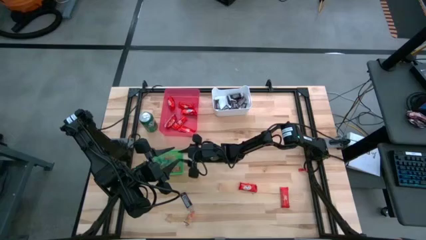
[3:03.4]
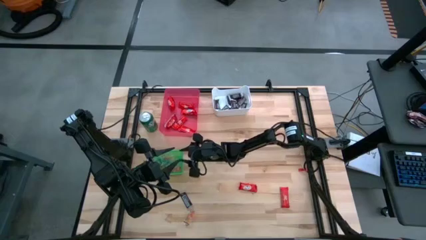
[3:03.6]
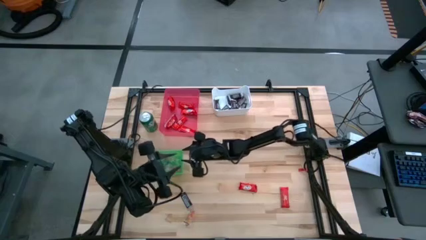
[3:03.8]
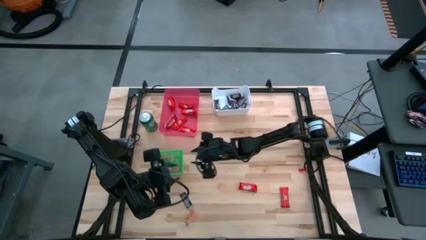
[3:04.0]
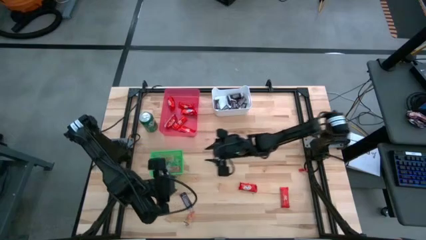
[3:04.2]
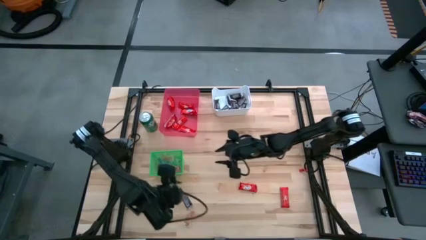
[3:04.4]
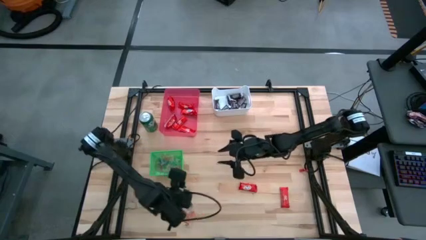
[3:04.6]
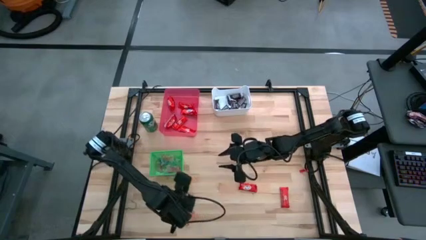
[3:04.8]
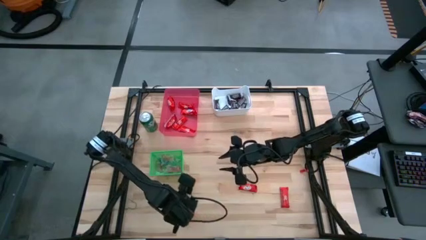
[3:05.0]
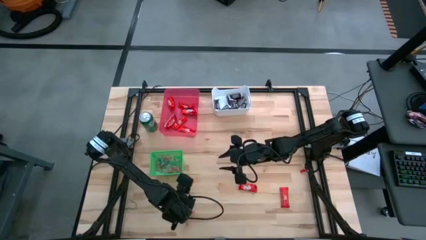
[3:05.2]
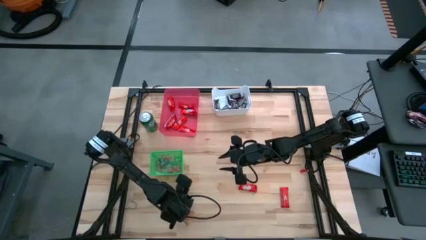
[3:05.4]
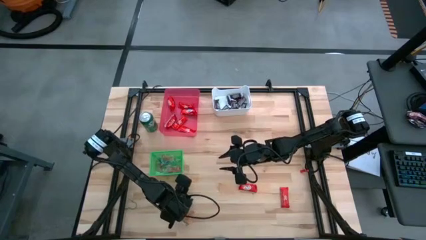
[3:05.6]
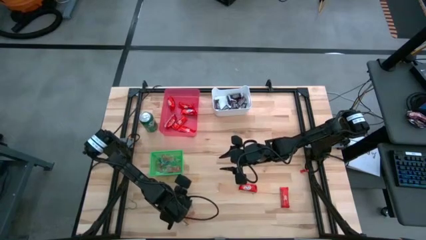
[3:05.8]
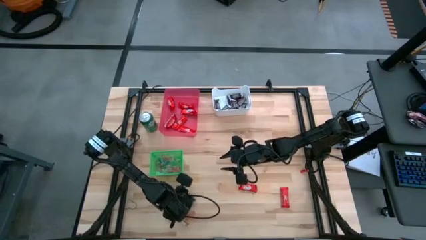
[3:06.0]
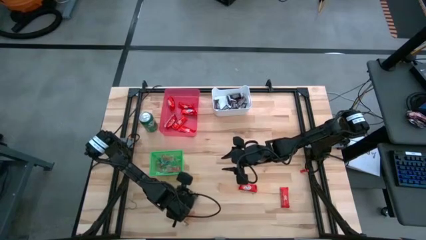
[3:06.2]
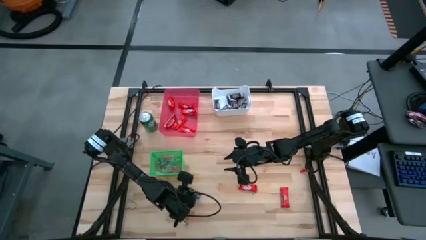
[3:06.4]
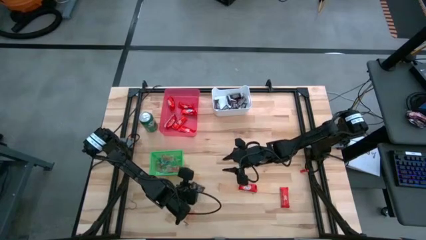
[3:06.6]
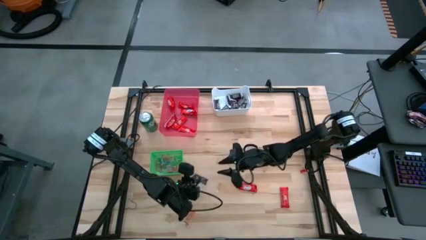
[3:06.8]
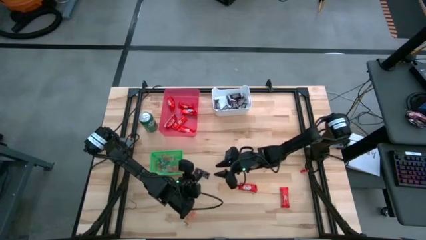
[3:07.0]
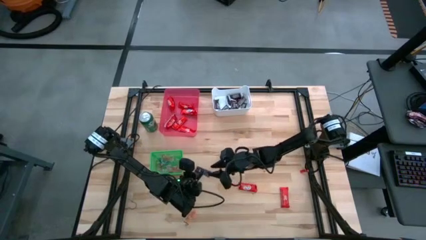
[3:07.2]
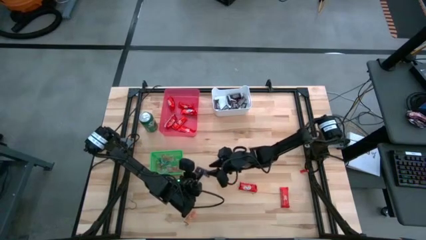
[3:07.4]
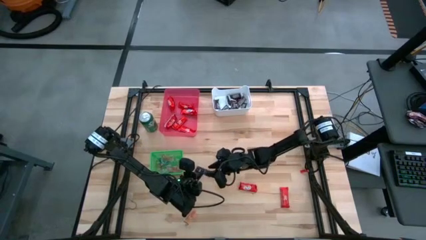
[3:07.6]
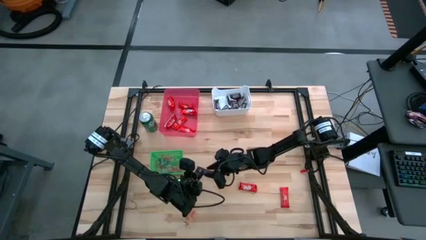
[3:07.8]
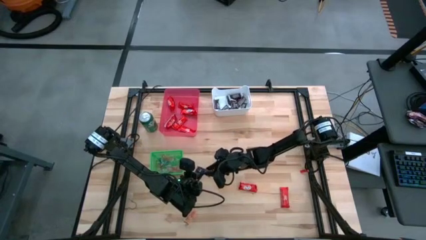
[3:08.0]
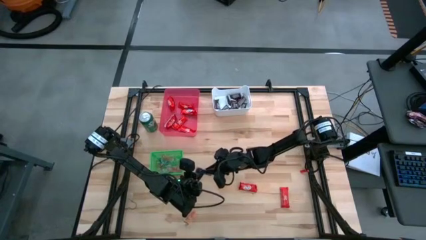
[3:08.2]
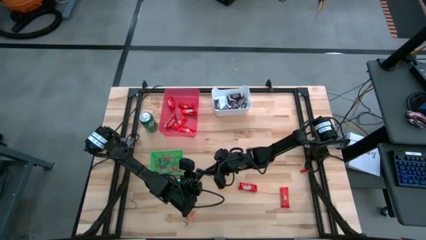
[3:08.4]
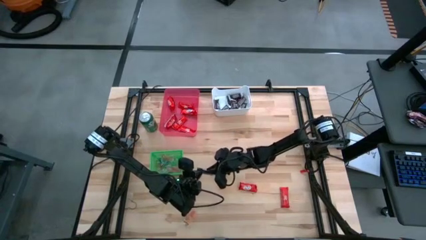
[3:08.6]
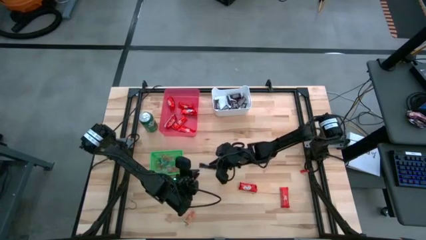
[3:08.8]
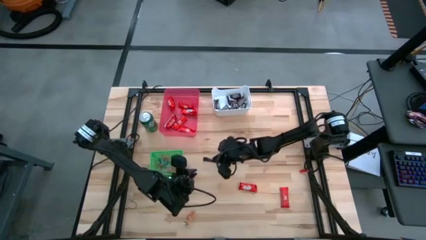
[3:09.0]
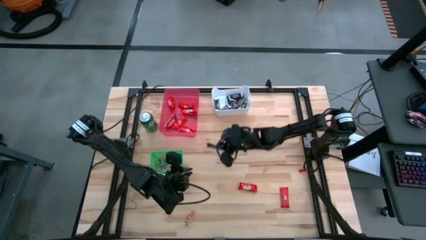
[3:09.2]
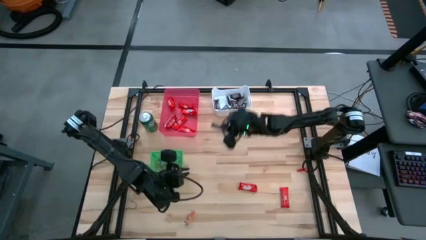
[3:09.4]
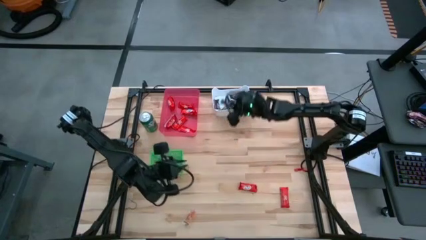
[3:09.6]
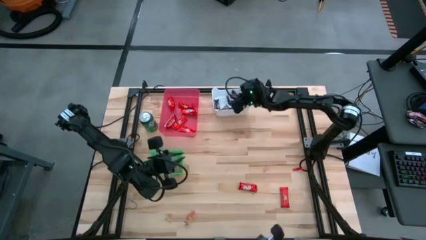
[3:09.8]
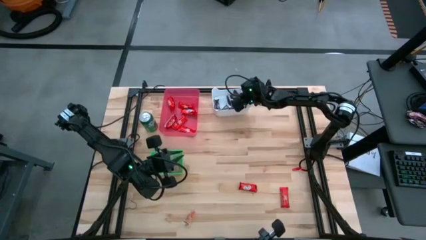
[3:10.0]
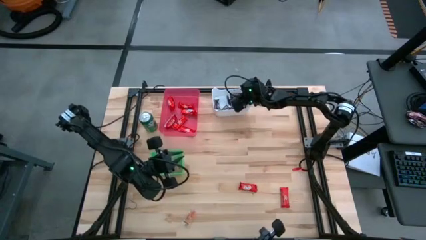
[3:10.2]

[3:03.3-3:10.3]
Task: Organize candy in baskets
Put the brown chocolate into the white bin

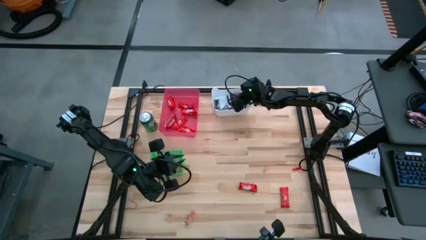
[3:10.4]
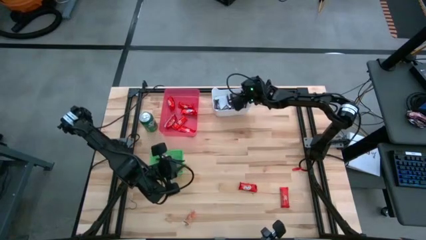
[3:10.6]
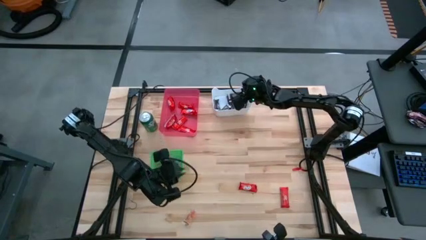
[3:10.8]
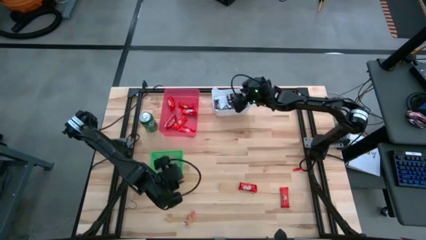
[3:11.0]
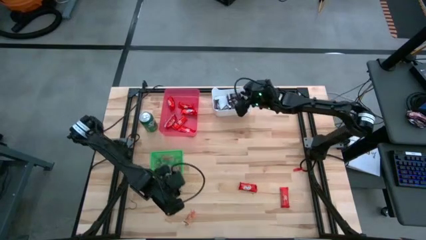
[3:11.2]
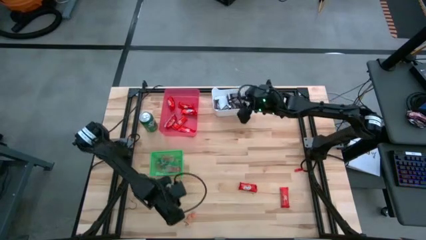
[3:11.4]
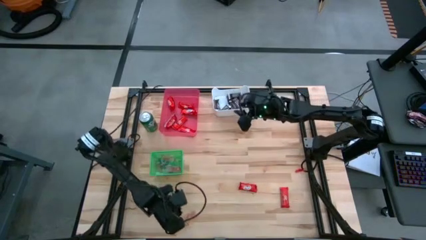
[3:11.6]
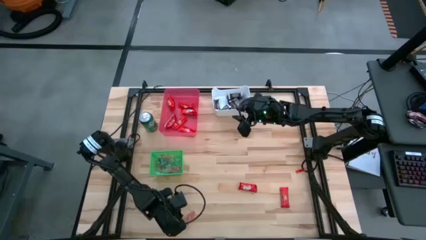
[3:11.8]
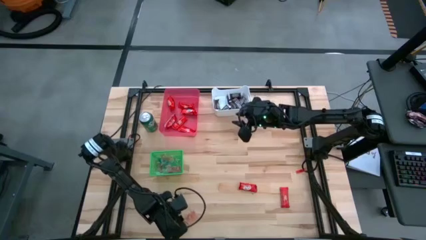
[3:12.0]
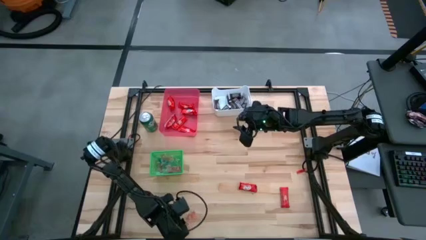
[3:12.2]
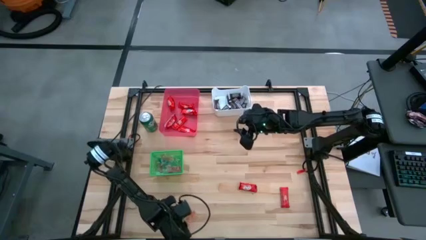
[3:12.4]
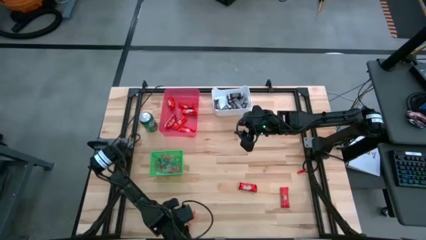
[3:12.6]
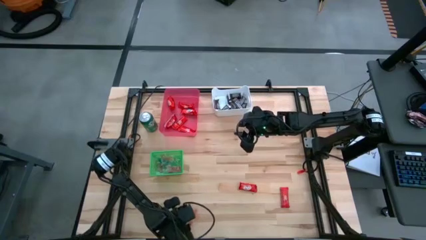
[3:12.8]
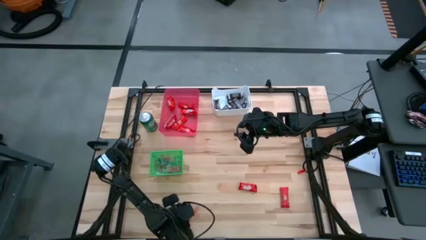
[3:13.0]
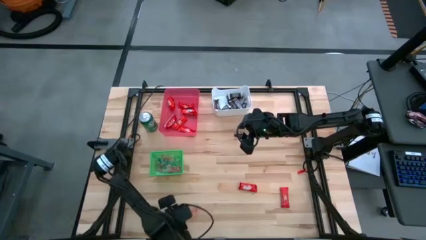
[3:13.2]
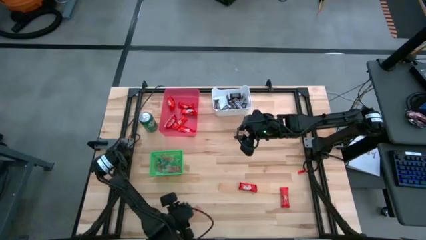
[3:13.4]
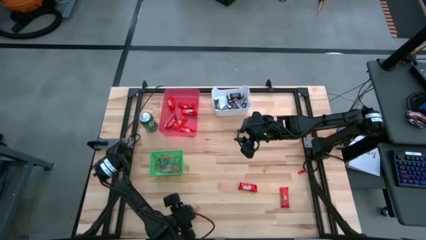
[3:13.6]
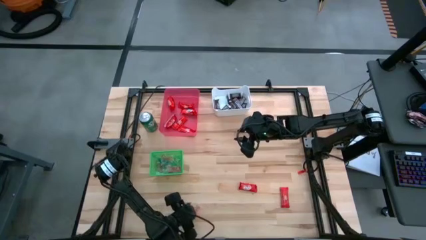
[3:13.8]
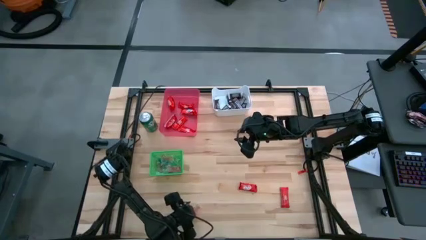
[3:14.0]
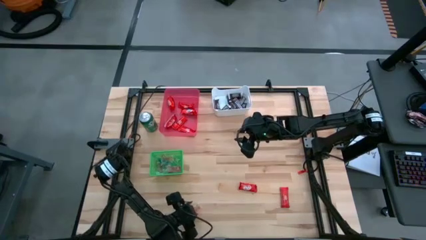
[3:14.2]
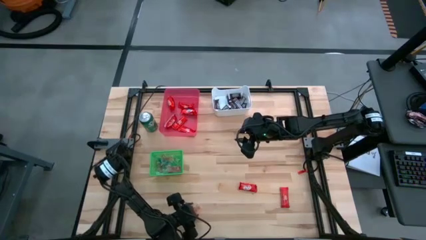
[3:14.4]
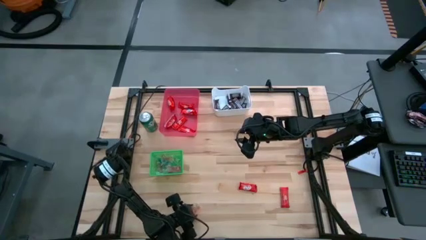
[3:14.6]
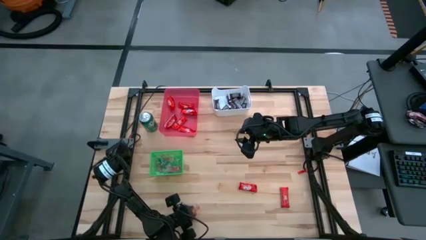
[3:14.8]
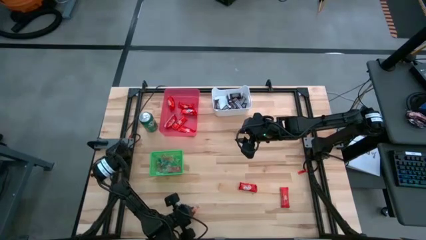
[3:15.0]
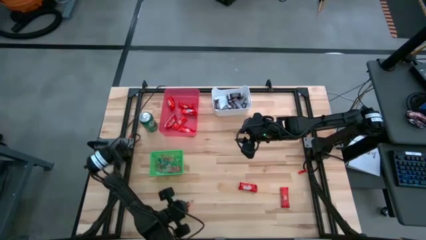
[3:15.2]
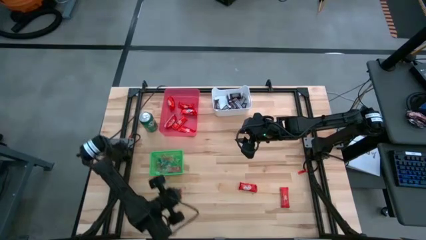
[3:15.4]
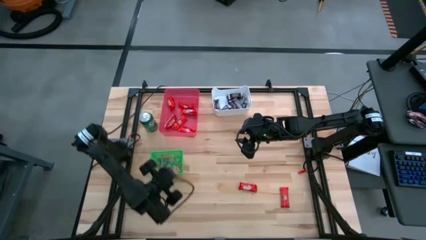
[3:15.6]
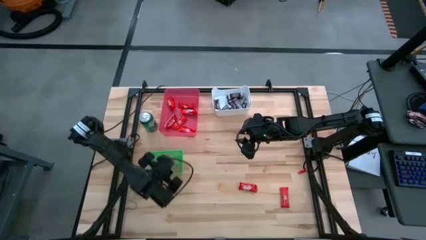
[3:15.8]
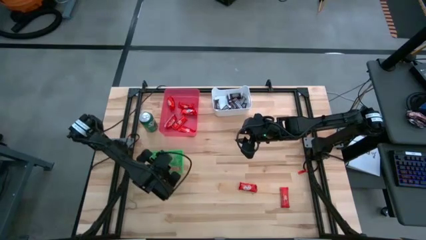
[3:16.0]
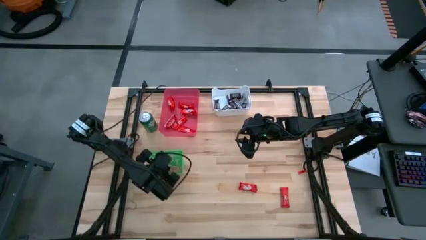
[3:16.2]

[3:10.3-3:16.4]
Put the orange gummy into the green bin

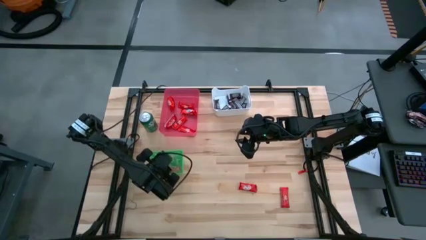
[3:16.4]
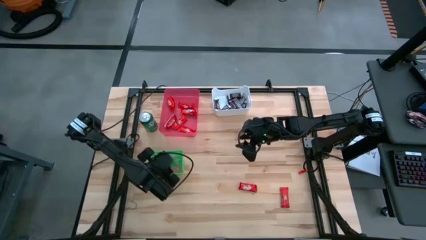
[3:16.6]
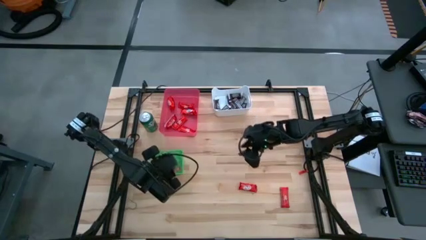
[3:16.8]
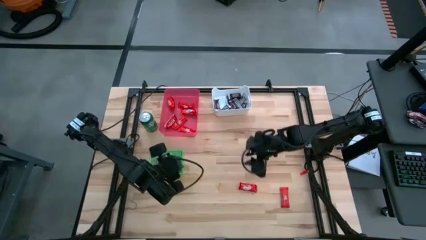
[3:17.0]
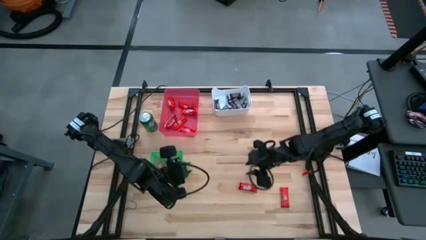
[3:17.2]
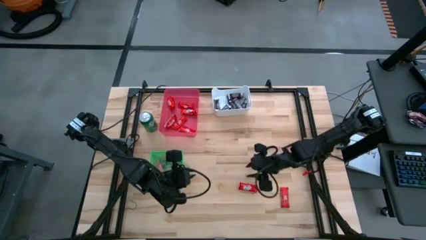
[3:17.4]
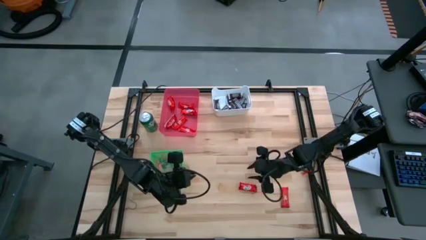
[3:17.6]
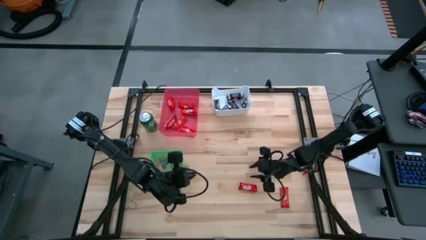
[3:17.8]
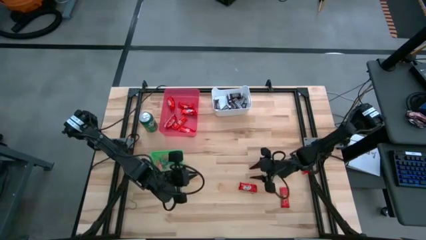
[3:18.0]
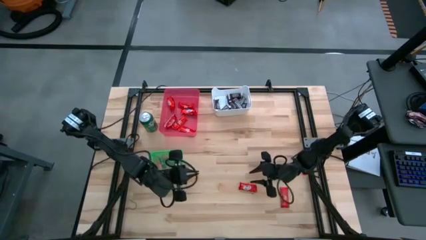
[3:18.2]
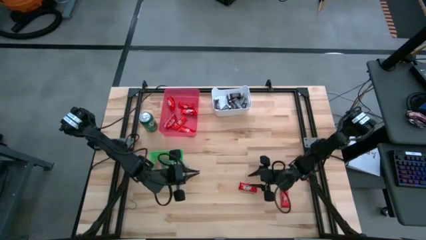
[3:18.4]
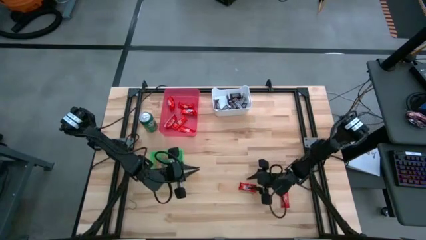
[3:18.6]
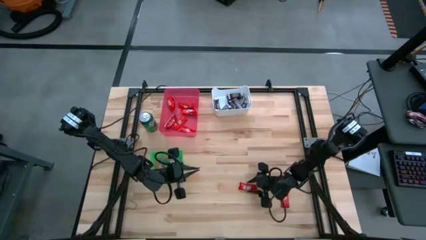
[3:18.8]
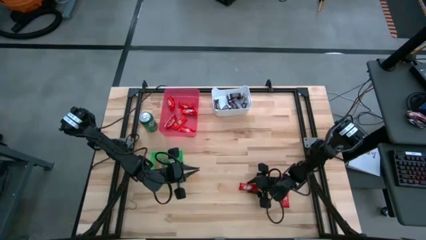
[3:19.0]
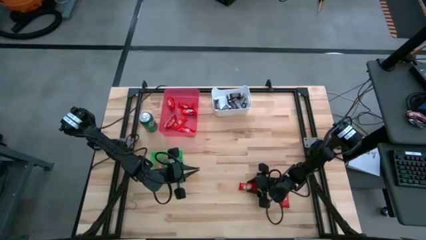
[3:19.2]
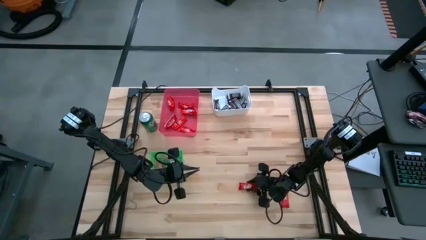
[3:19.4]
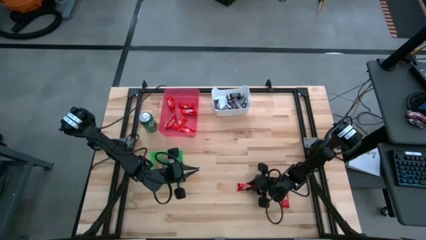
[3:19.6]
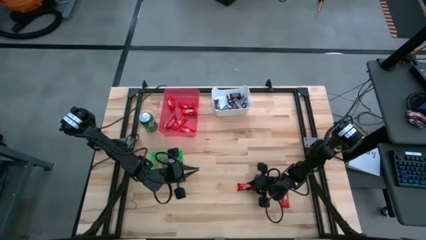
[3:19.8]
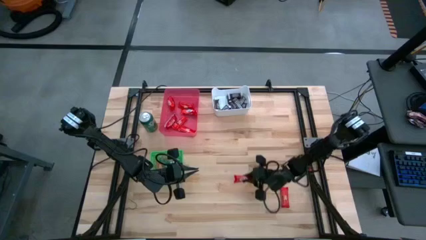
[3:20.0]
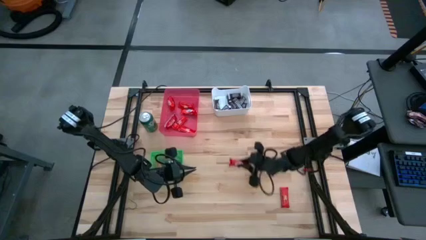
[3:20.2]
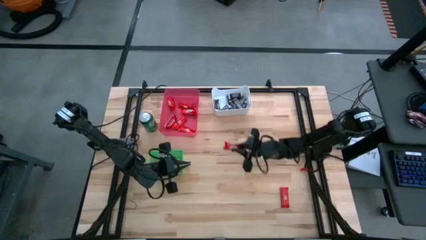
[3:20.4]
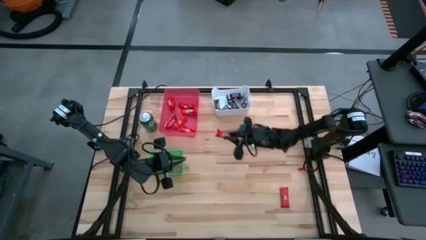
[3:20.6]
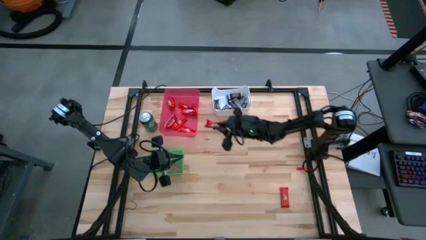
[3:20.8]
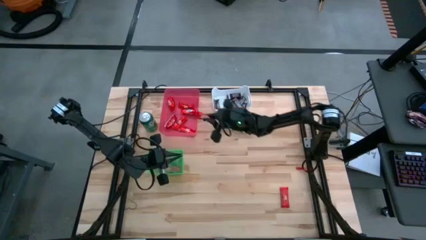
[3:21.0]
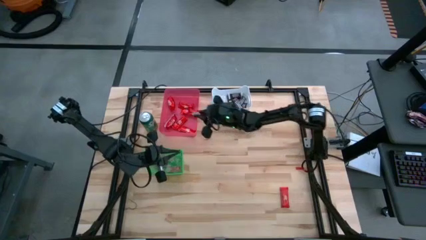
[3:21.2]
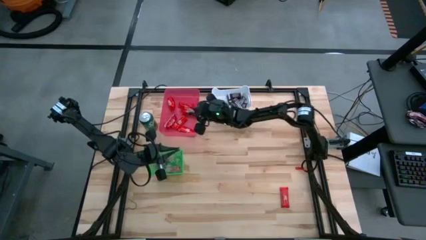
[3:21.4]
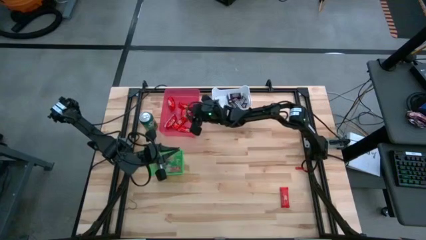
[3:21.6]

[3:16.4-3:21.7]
Put the red chocolate into the pink bin
